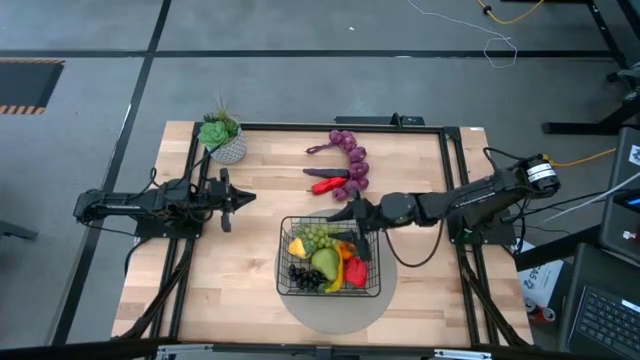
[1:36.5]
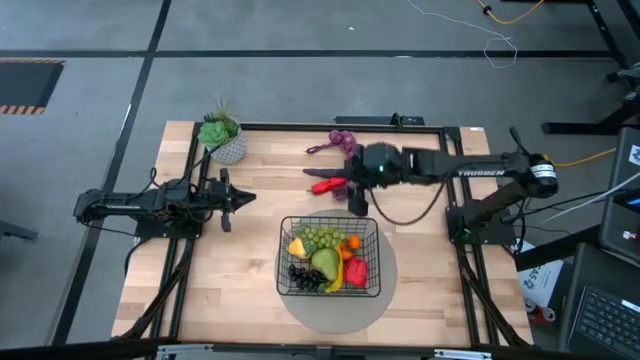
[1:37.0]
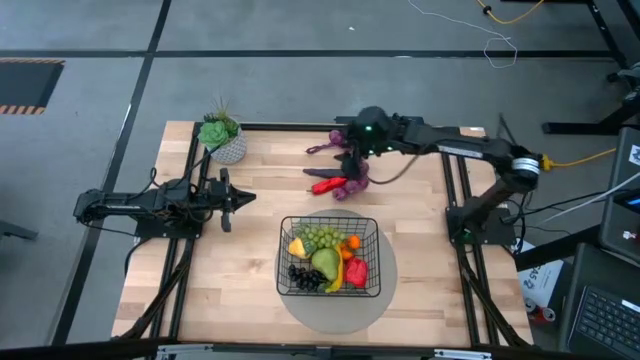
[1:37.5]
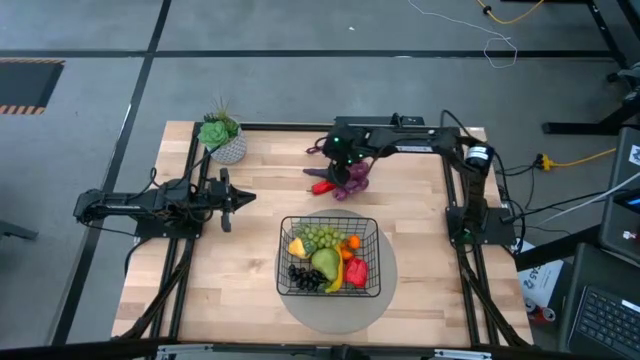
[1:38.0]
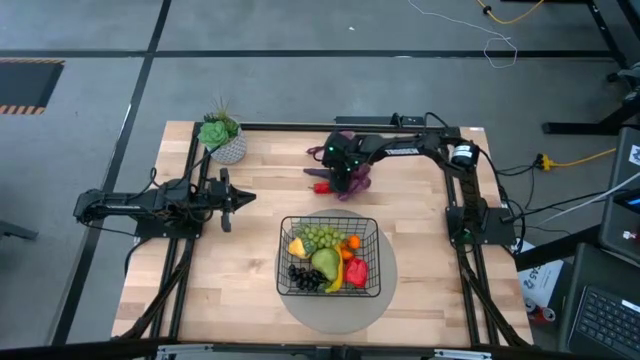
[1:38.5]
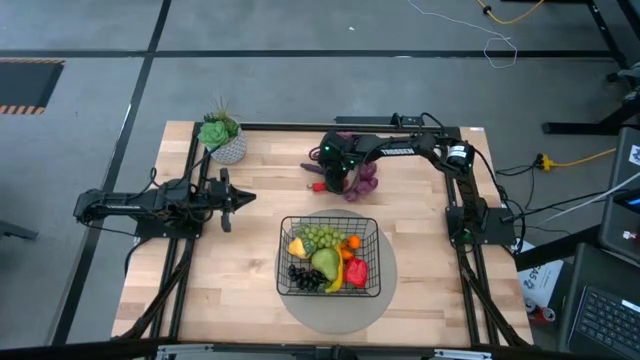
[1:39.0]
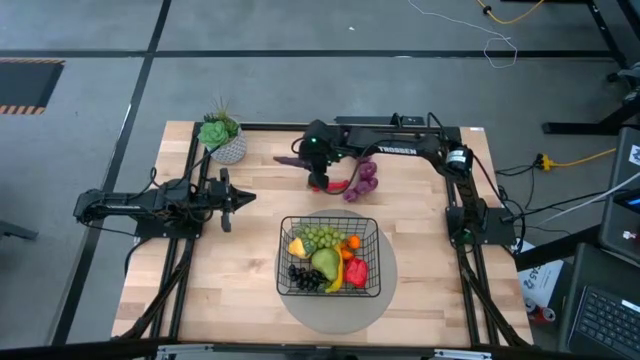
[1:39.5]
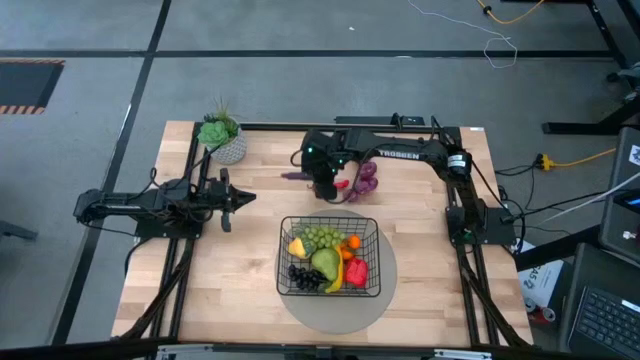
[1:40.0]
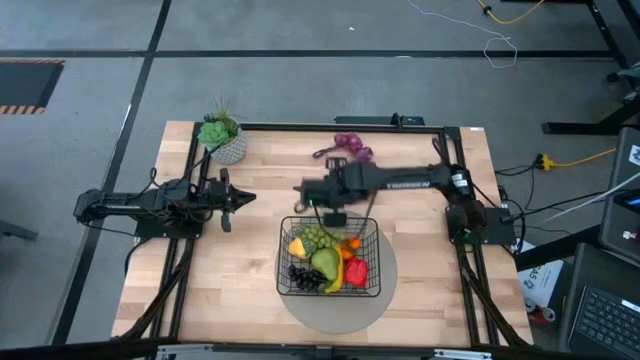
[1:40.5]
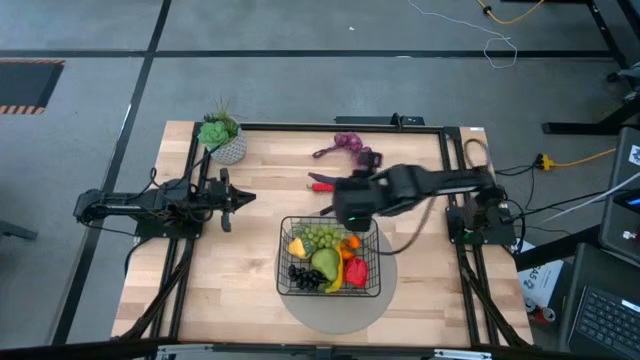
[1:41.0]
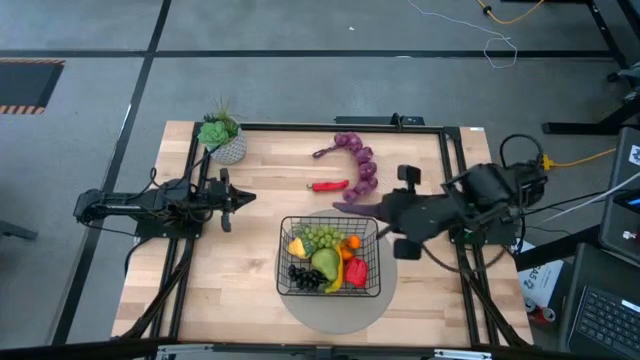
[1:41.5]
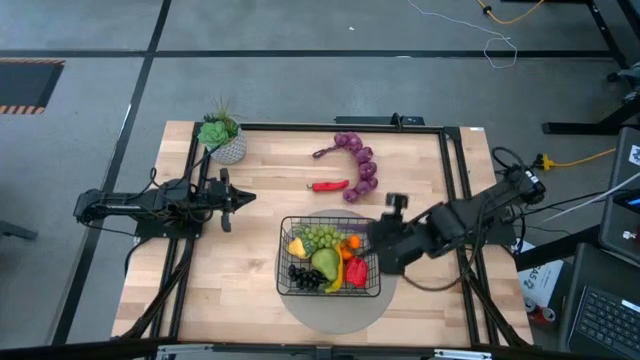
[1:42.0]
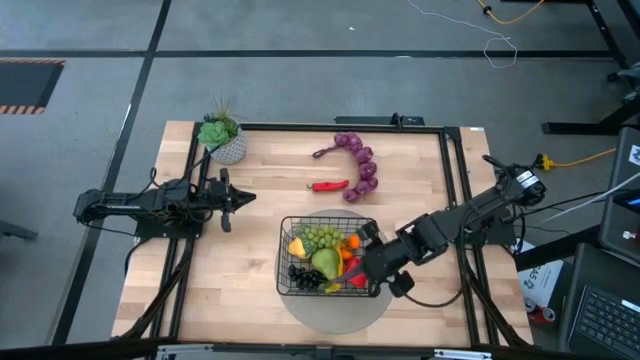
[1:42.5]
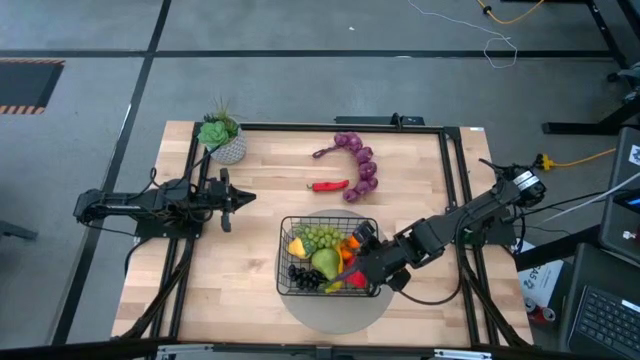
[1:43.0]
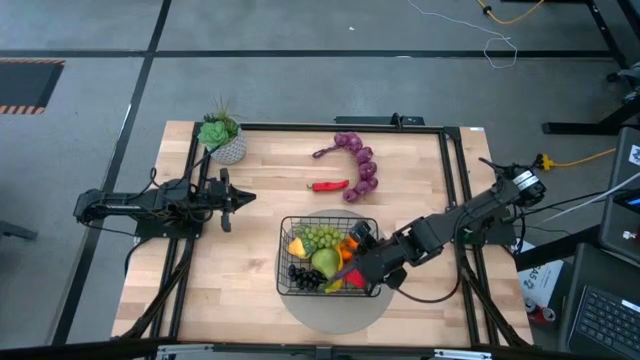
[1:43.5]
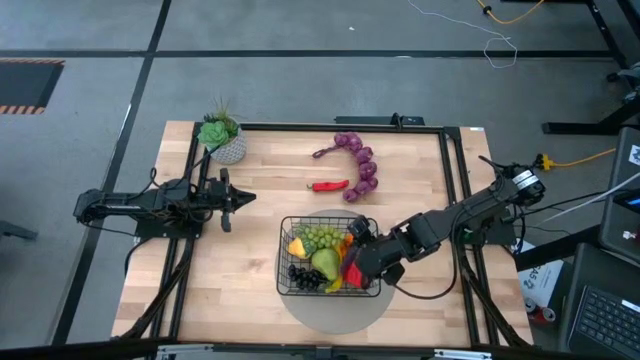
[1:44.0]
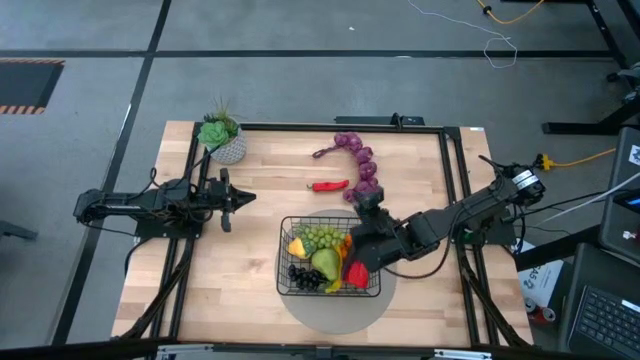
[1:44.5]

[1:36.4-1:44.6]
Task: Build produce basket
Put the violet chili pepper into the wire basket

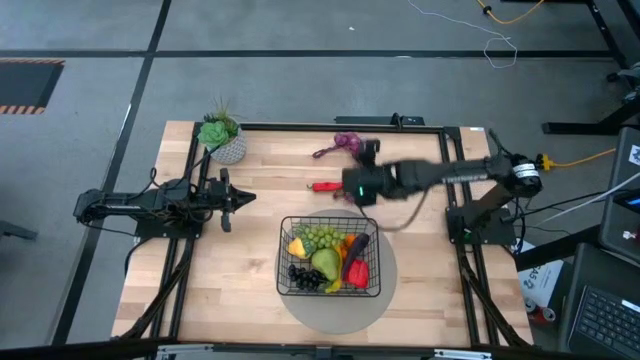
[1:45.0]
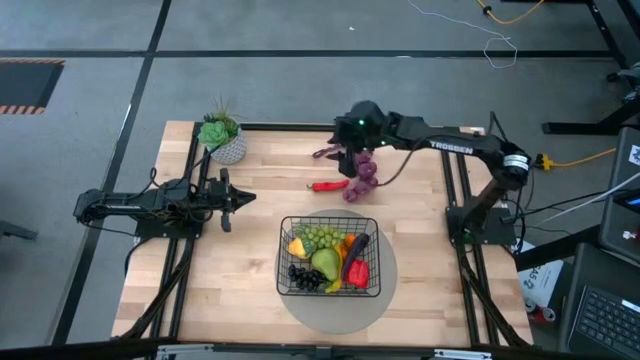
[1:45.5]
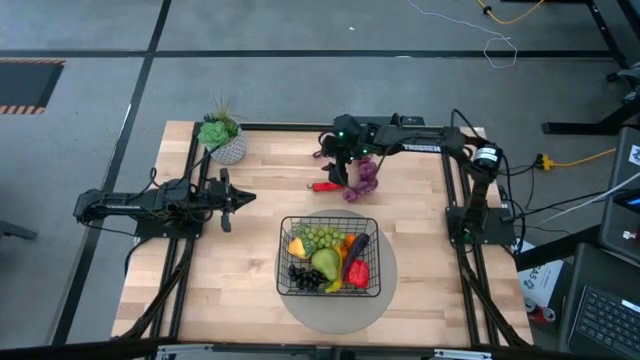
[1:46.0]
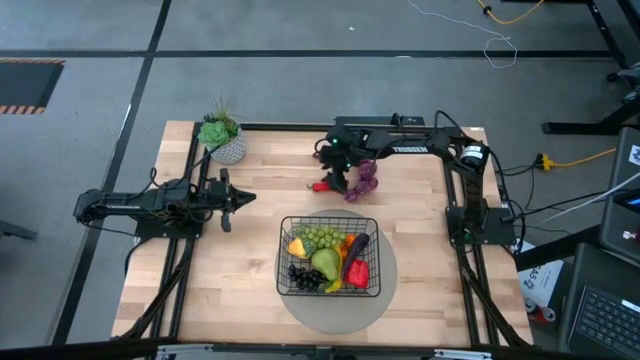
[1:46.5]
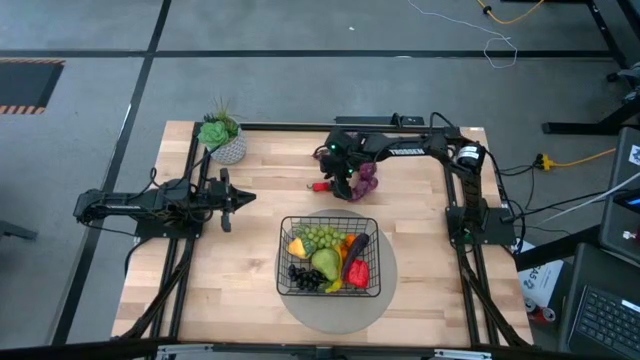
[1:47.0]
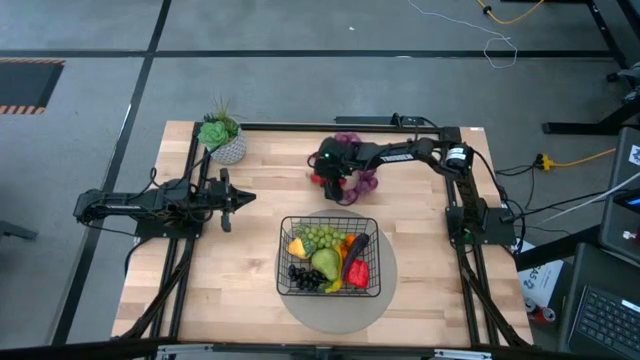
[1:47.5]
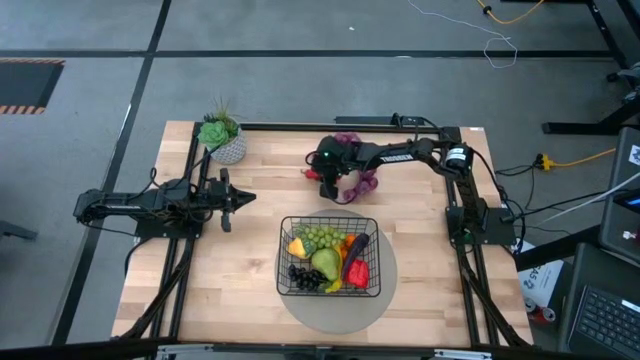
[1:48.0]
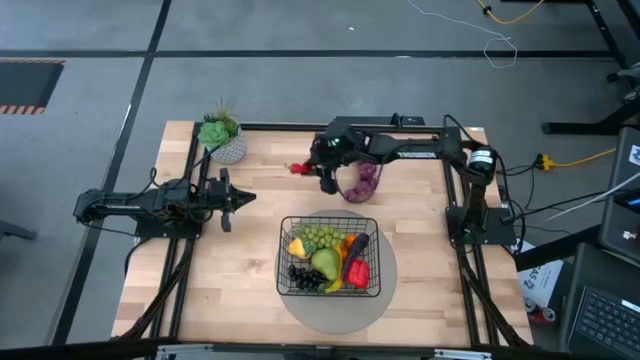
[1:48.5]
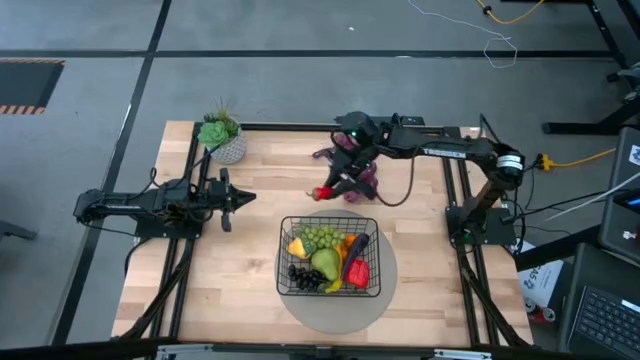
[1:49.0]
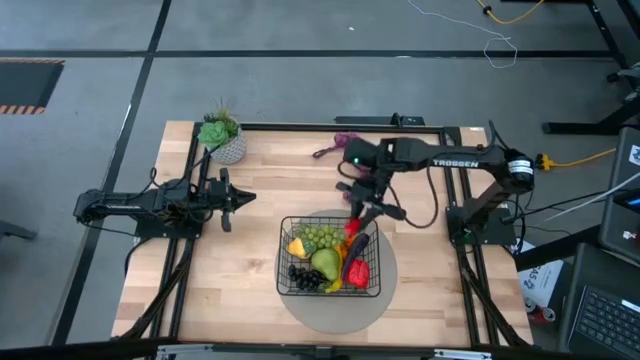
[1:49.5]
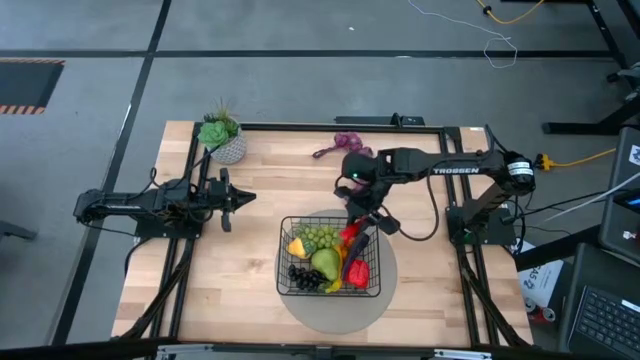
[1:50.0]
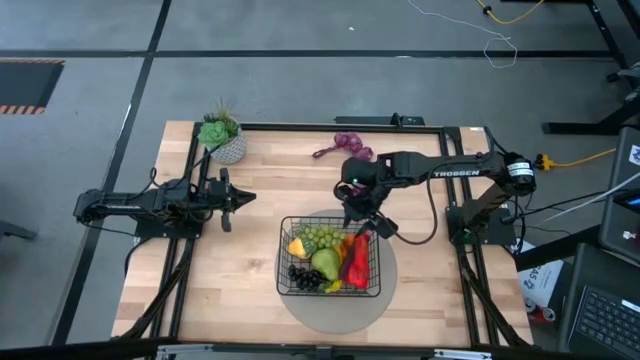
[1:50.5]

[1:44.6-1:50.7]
Put the red chili pepper into the wire basket

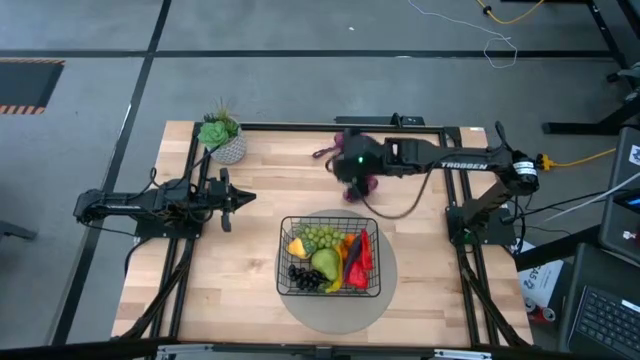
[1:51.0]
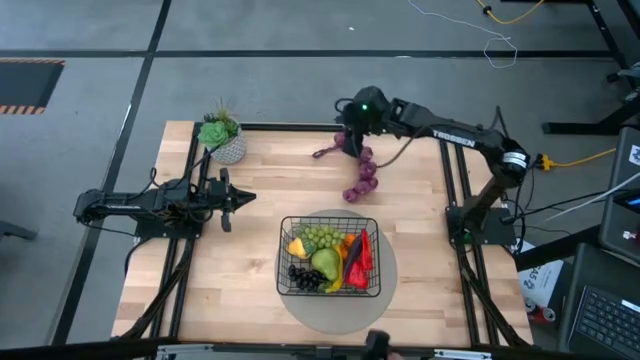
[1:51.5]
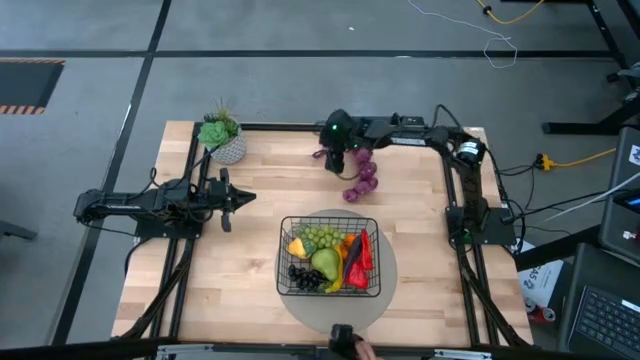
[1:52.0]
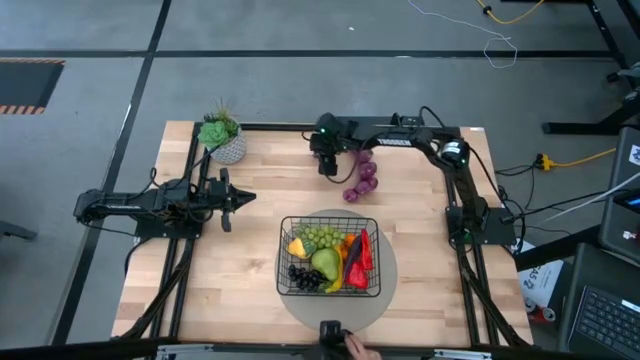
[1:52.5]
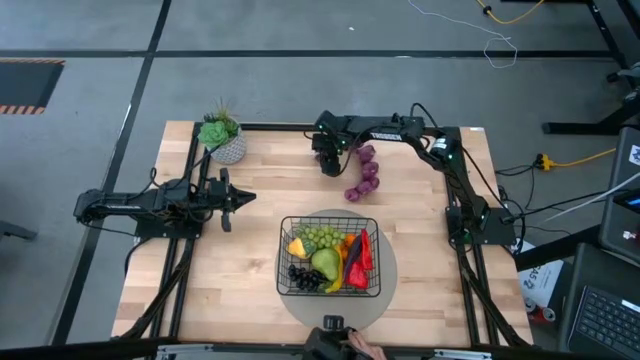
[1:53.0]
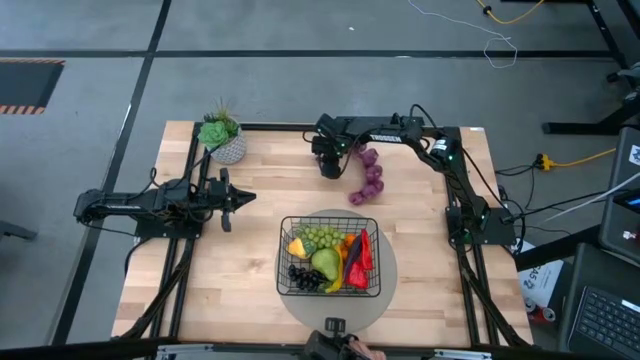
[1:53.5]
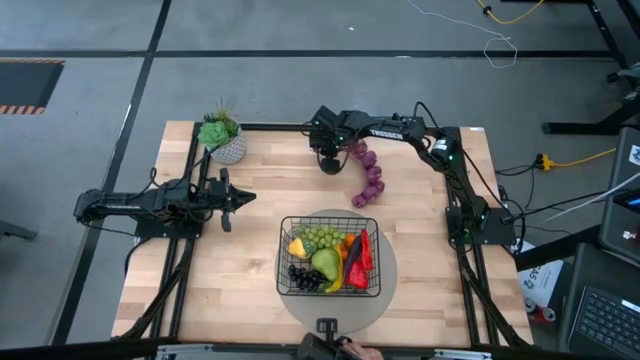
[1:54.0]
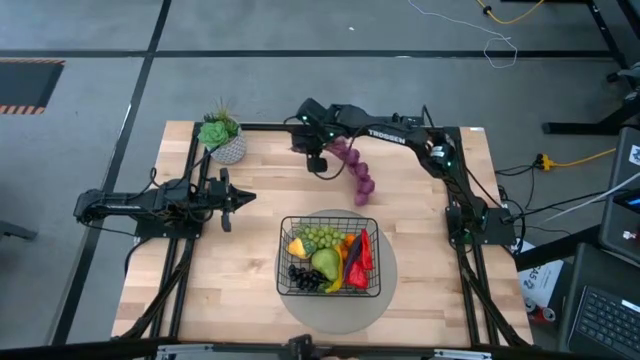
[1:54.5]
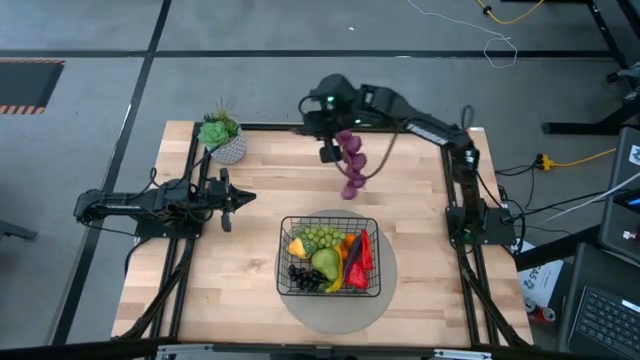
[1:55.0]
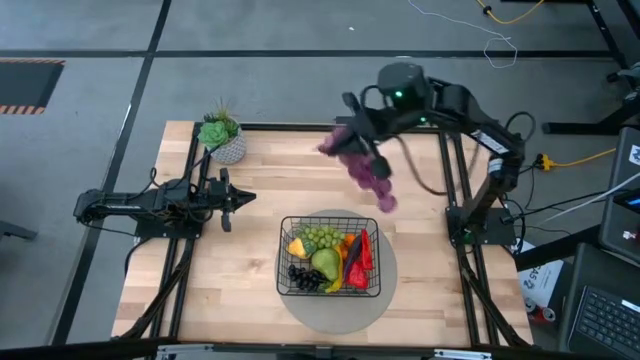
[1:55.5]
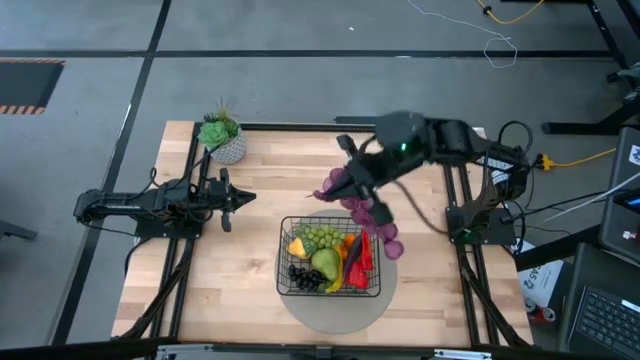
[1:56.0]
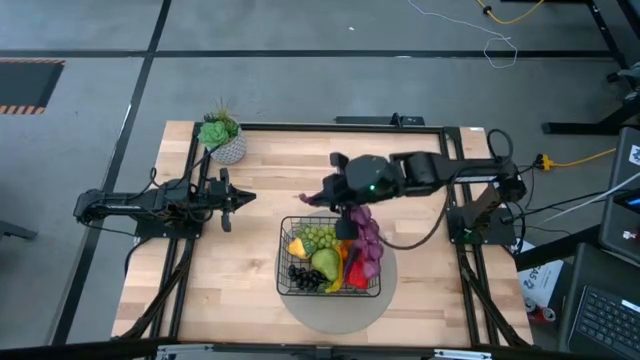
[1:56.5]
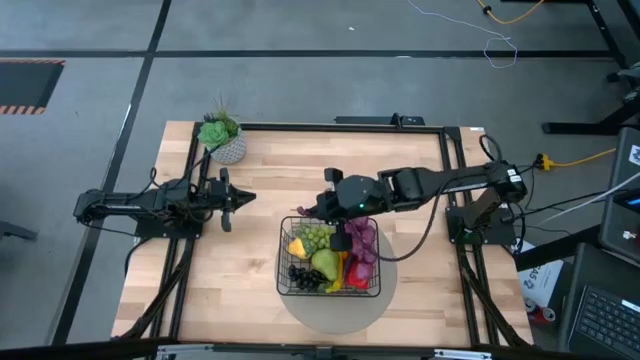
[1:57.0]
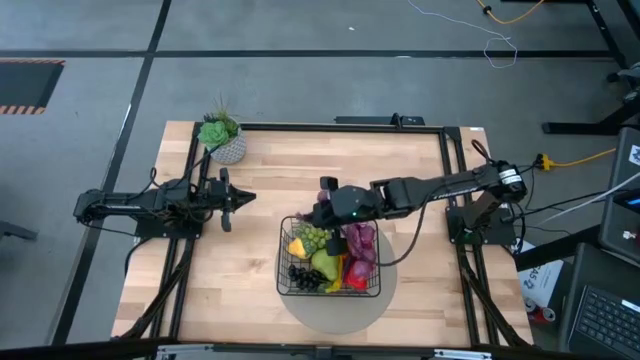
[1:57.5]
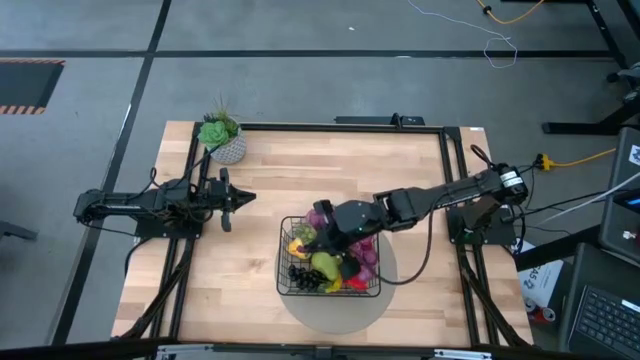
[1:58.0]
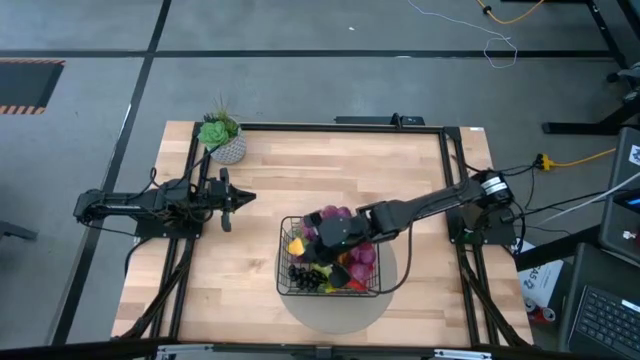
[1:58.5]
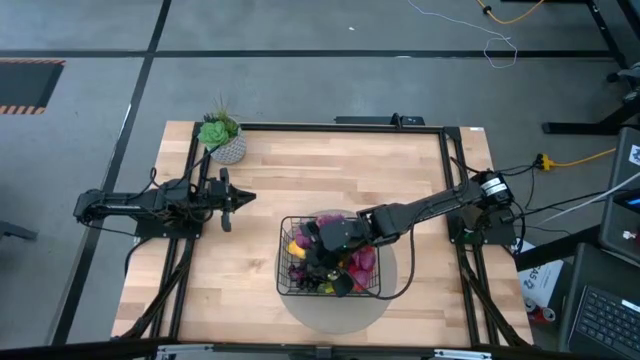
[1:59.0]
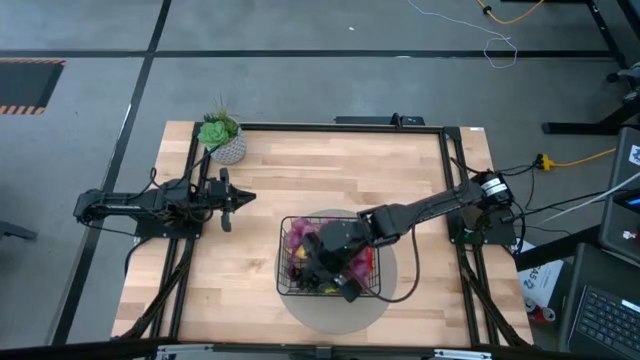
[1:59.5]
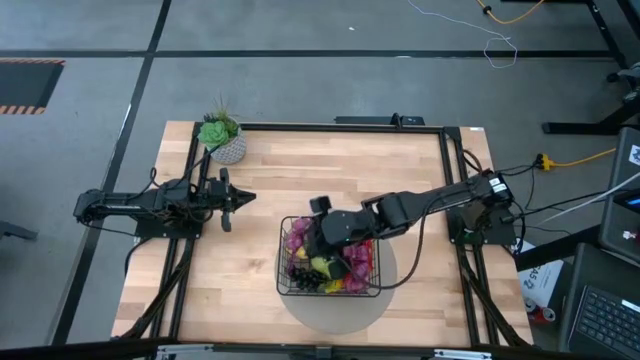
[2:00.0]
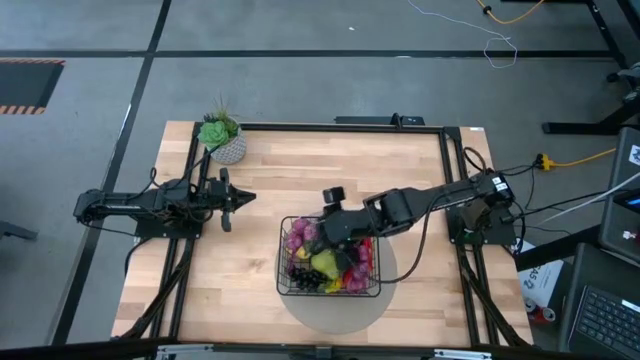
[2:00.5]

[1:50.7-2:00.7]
Put the purple garlic into the wire basket
